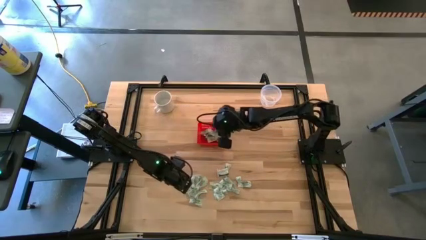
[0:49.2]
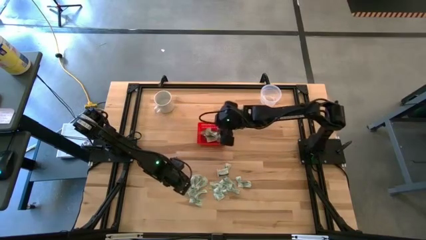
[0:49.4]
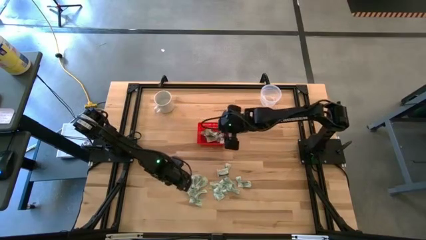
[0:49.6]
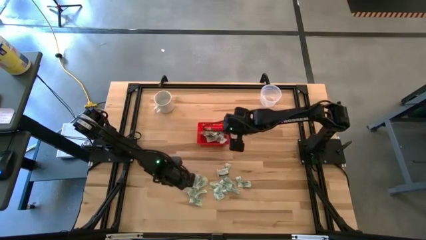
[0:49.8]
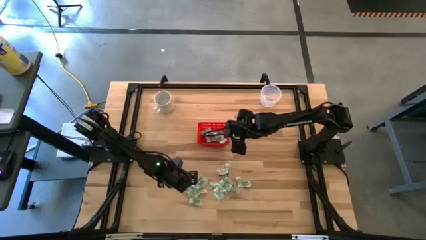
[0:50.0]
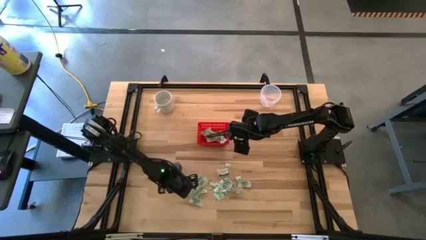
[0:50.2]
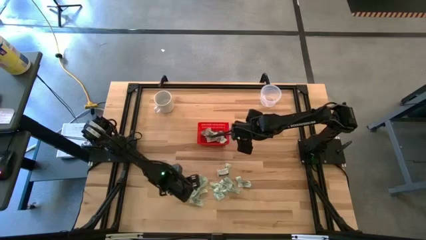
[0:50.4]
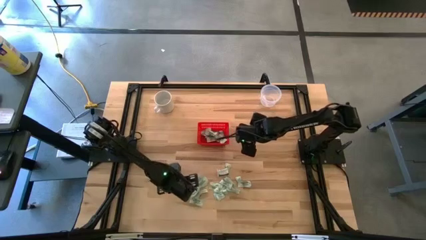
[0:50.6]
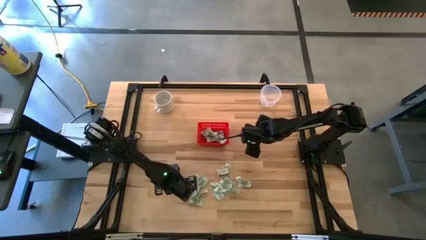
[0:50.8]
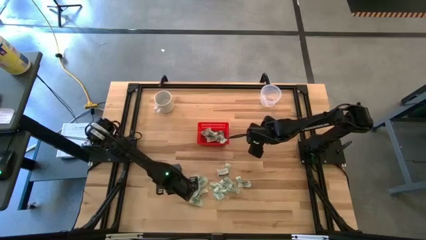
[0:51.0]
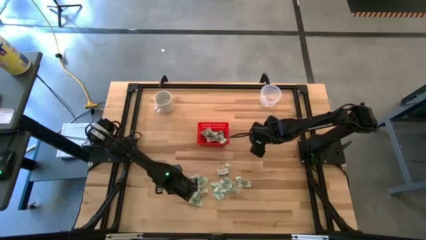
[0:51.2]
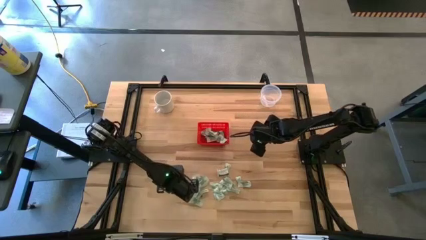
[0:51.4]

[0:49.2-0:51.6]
Task: Pick and place items into bin
Put the stevia packet into the red bin

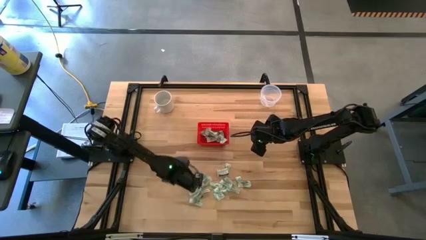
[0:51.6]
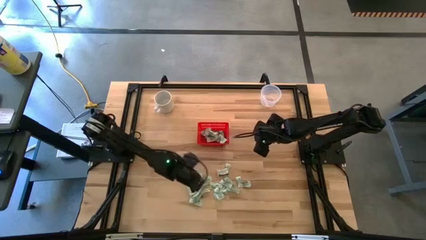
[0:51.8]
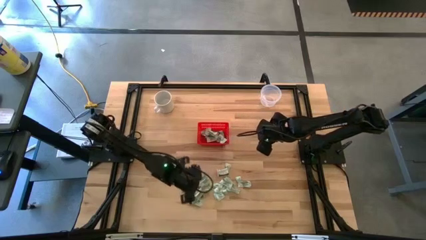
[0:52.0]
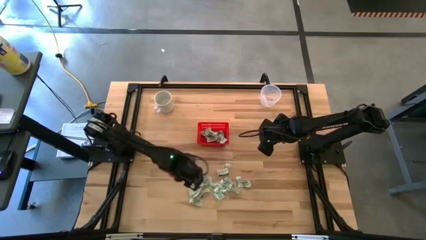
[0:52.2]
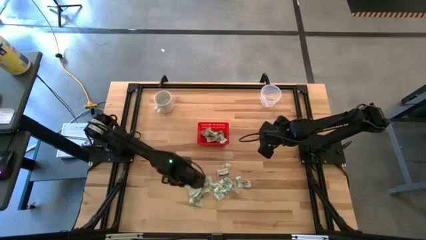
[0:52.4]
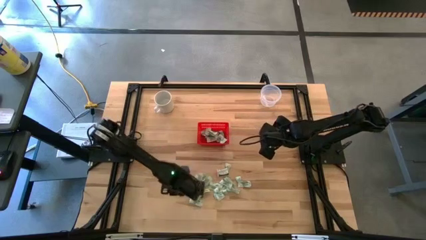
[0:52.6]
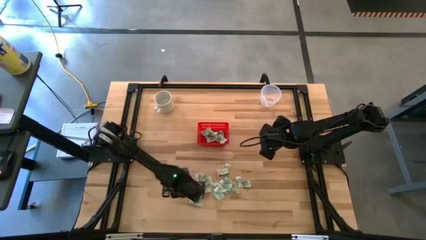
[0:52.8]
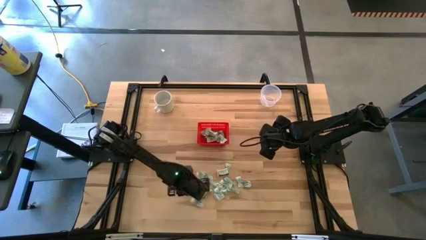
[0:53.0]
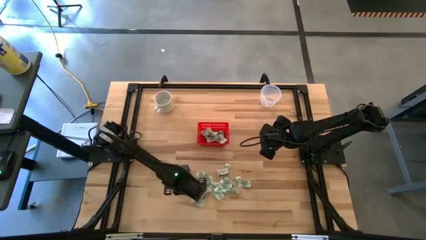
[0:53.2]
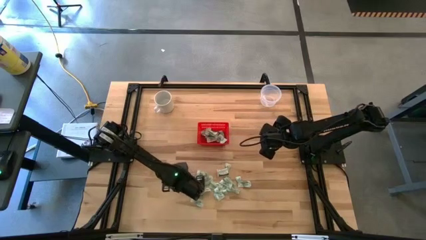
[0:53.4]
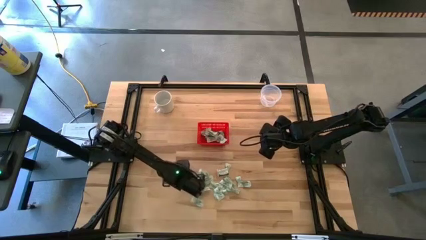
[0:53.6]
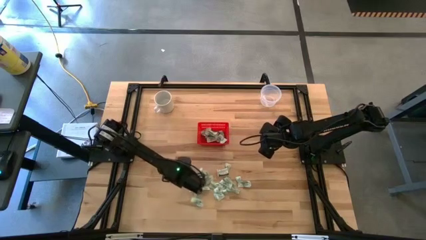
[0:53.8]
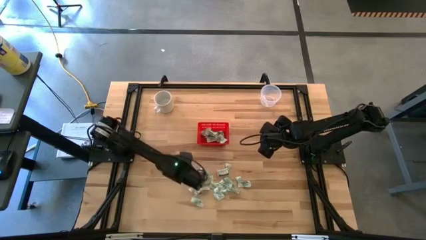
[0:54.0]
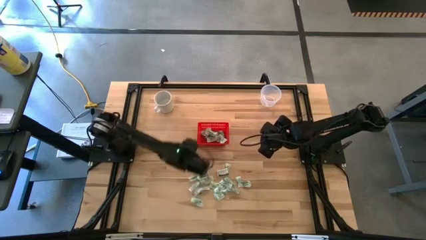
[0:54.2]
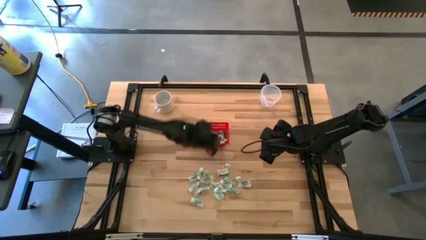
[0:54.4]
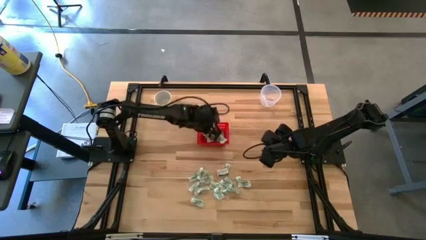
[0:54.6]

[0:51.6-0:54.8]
Put the stevia packet into the red bin

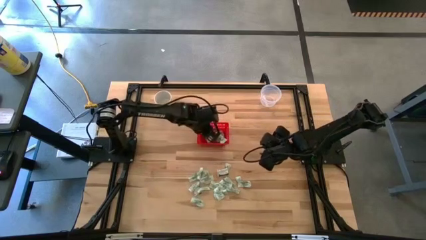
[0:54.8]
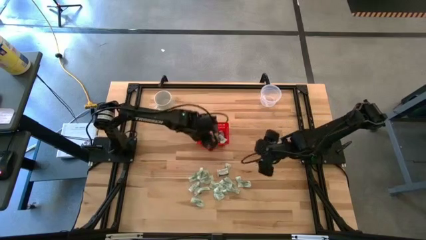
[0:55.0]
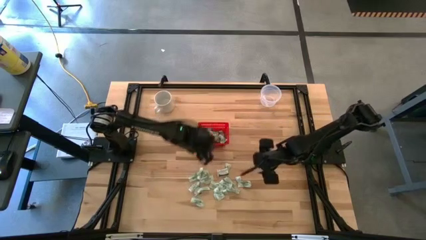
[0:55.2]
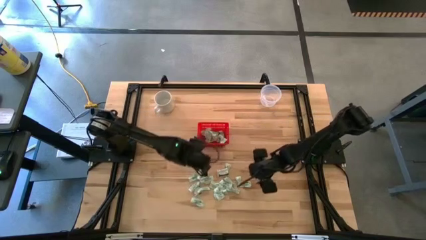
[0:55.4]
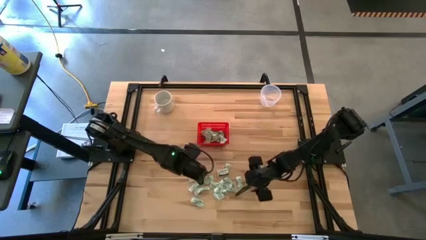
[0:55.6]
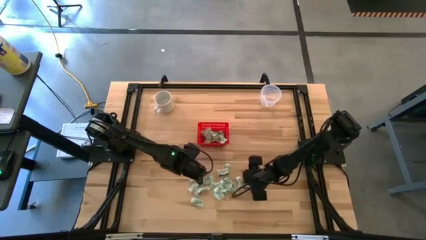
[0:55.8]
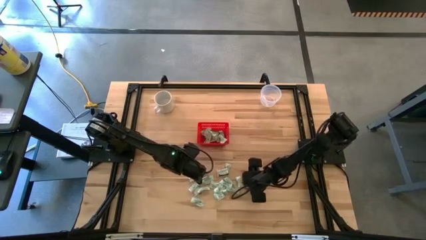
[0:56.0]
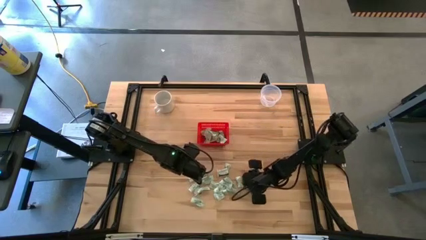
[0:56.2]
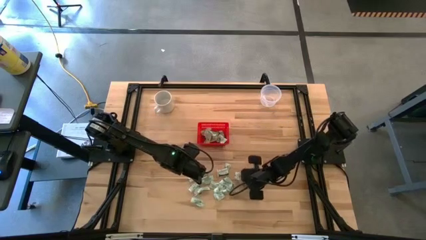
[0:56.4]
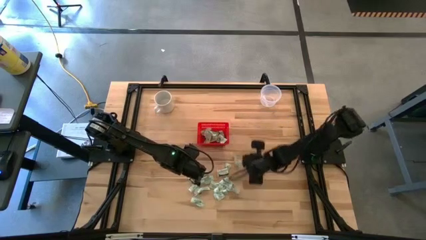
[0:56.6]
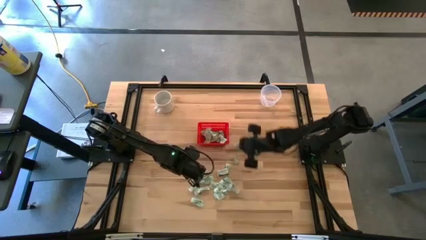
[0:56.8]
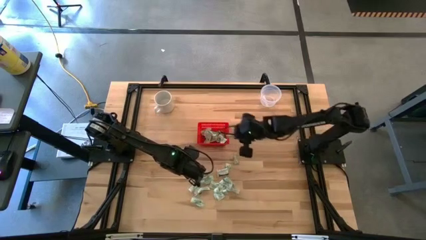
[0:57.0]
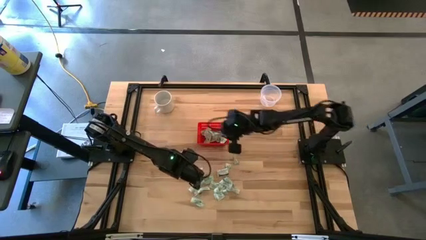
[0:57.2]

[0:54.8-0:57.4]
Put the stevia packet into the red bin

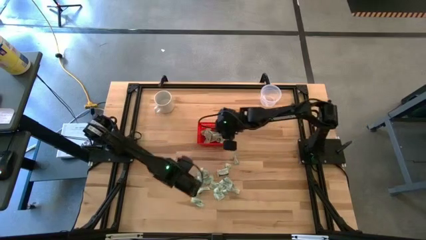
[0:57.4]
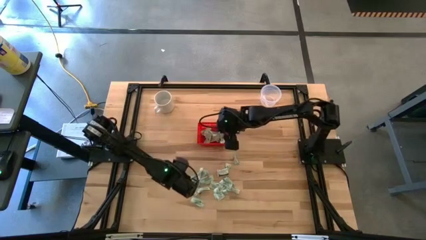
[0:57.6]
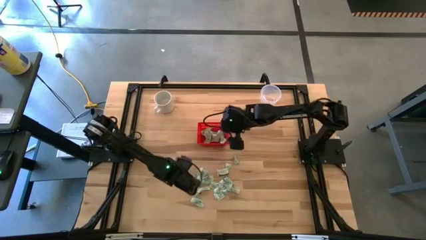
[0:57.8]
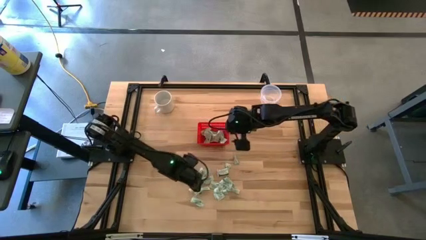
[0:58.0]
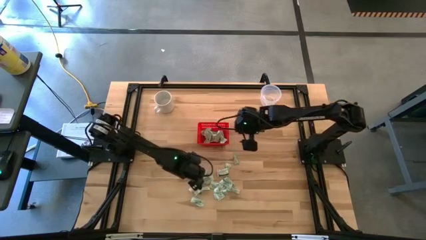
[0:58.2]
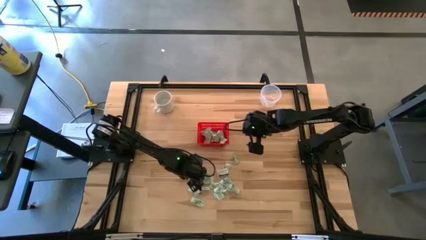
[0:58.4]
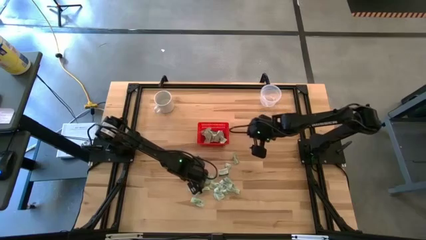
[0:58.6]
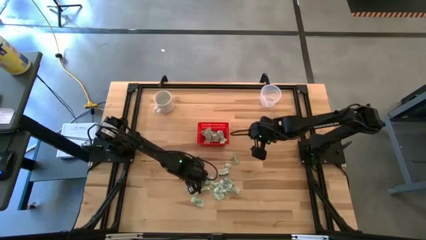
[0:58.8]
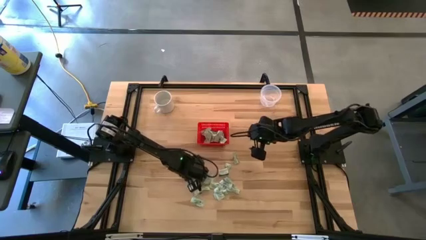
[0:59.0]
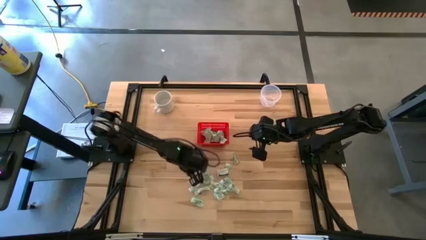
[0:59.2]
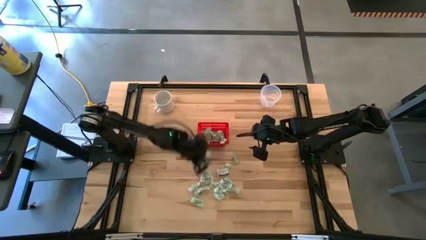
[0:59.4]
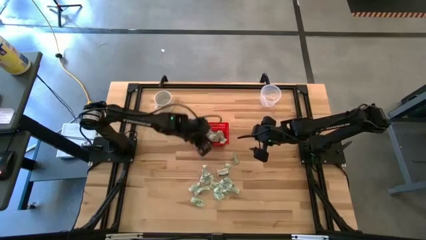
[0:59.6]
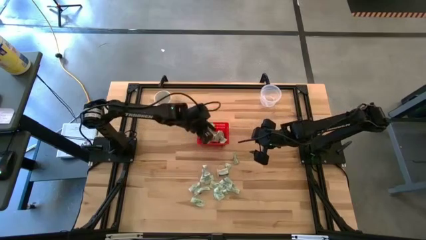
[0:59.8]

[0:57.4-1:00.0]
Put the stevia packet into the red bin

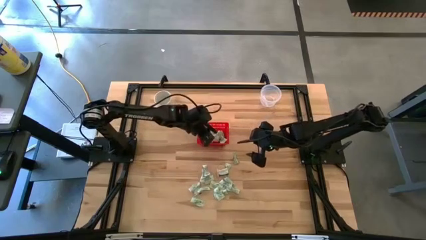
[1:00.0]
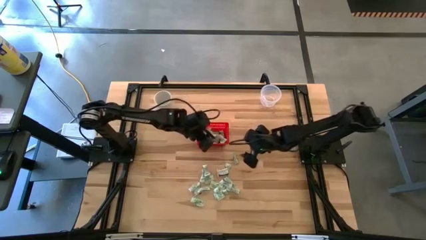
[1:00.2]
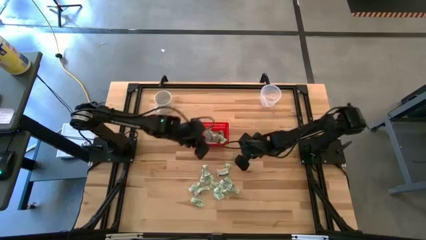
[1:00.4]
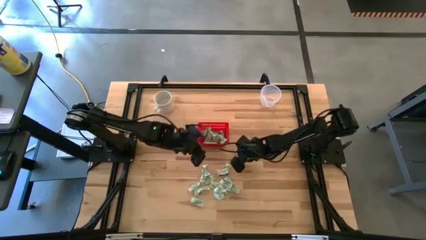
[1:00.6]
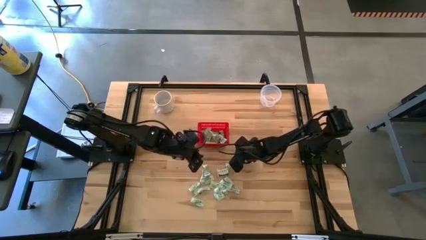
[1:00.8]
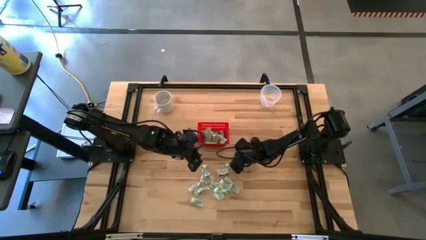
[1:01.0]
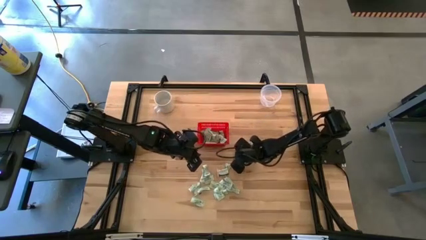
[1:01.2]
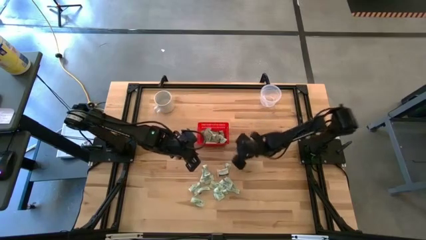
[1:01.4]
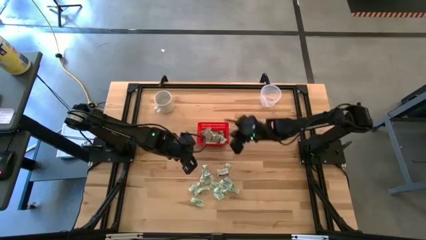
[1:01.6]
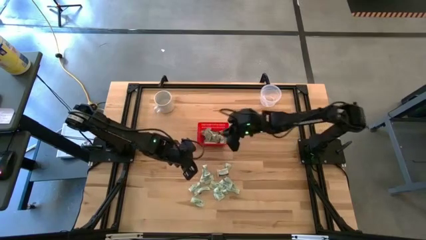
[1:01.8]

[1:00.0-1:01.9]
Put the stevia packet into the red bin

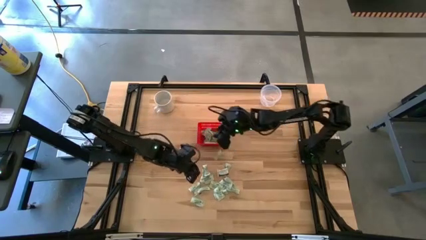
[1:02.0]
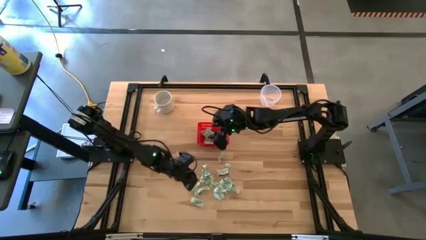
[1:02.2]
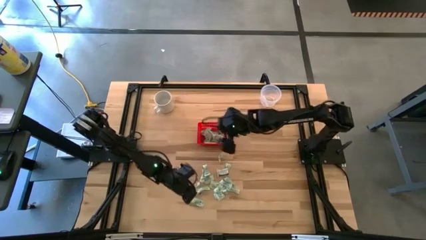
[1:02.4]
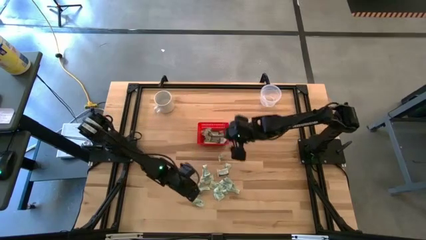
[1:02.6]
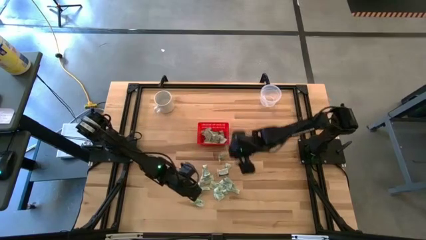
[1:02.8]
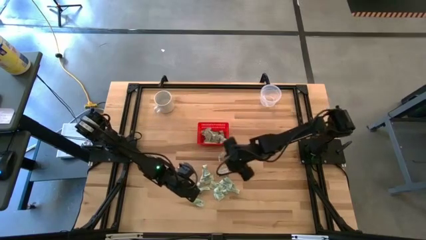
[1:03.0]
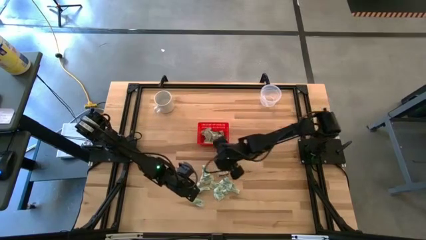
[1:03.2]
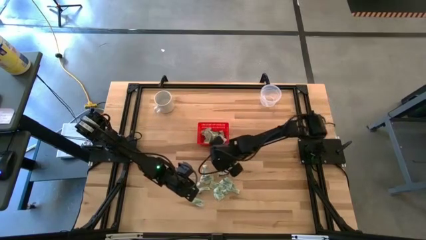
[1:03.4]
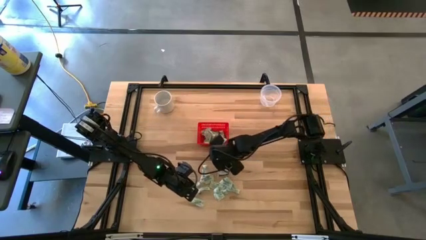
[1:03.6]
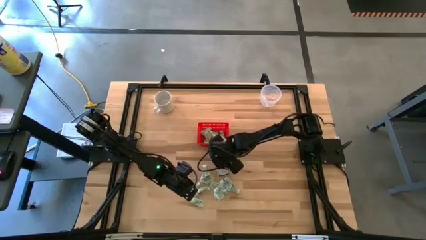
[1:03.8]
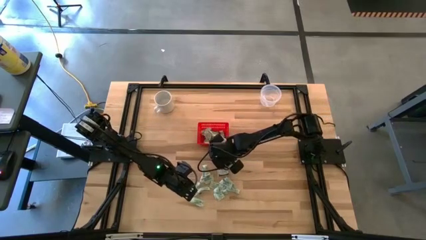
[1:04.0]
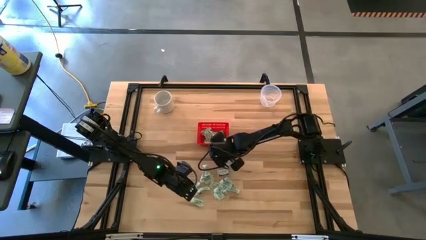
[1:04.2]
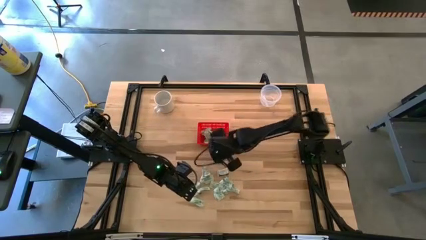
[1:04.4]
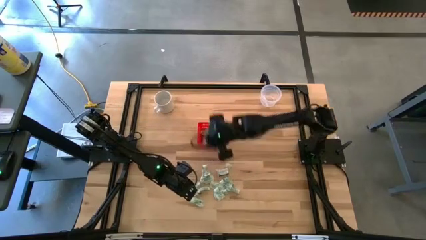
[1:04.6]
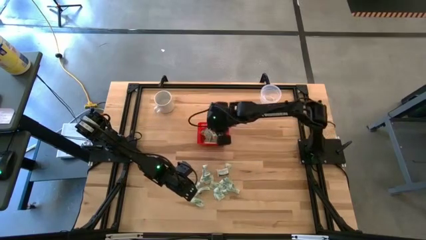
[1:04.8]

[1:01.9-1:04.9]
Put the stevia packet into the red bin

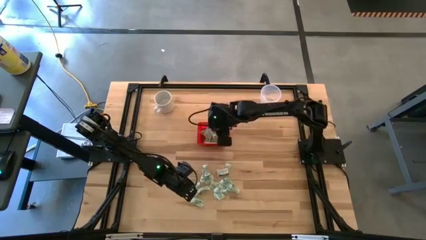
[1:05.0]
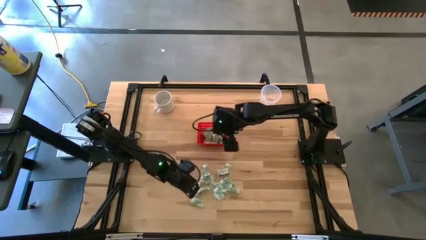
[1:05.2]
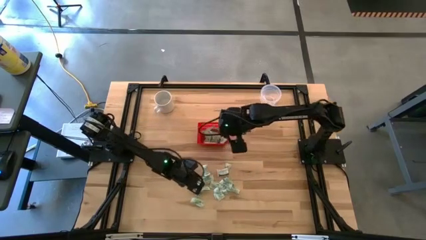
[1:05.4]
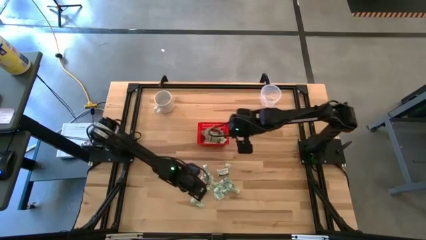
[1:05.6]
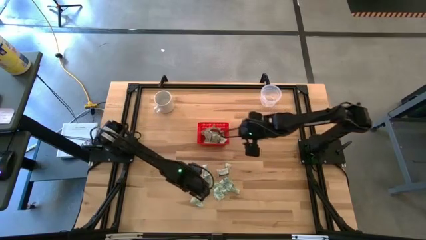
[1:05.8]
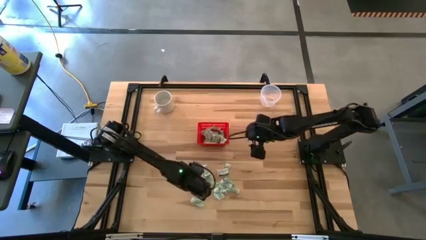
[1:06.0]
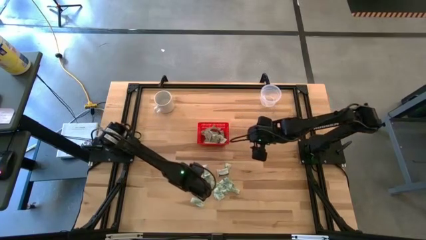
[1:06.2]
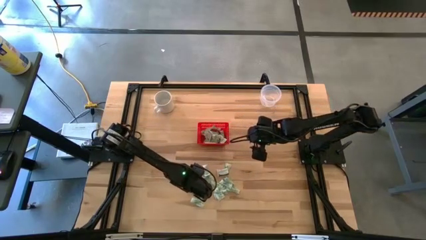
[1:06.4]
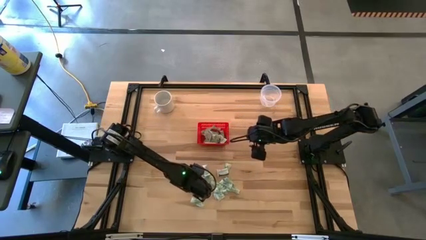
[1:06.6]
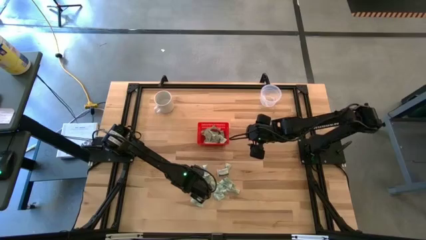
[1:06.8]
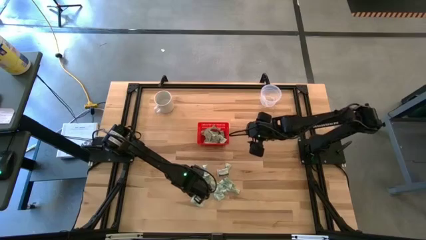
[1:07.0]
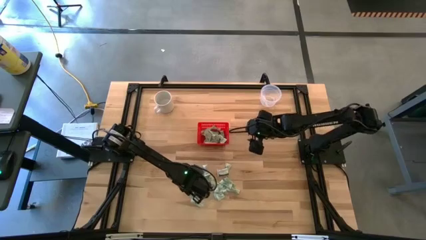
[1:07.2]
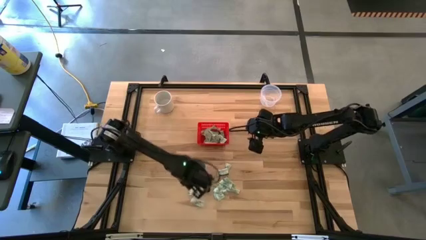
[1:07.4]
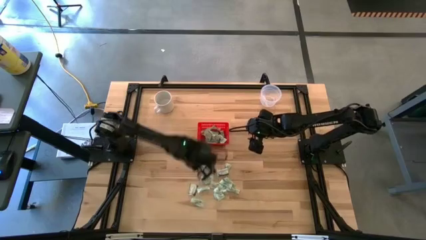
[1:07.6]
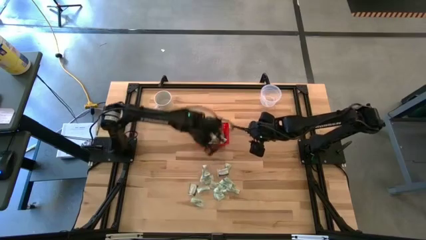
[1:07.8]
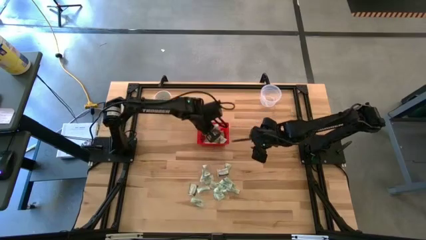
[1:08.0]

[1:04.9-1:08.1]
Put the stevia packet into the red bin
